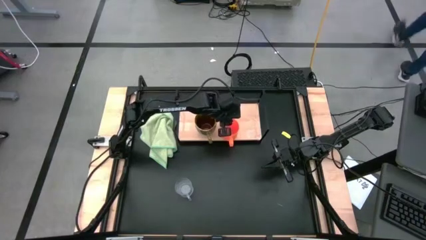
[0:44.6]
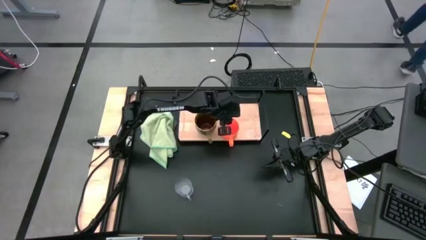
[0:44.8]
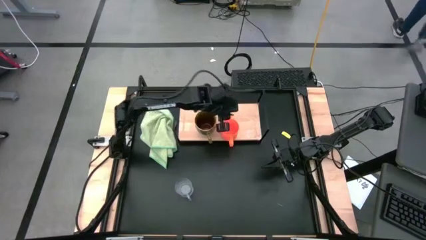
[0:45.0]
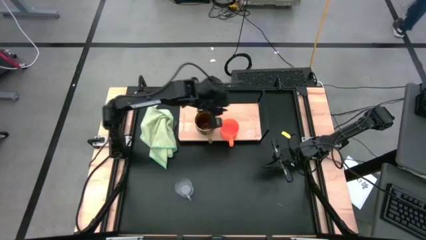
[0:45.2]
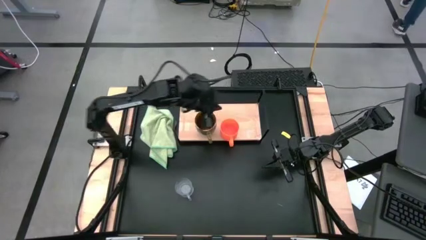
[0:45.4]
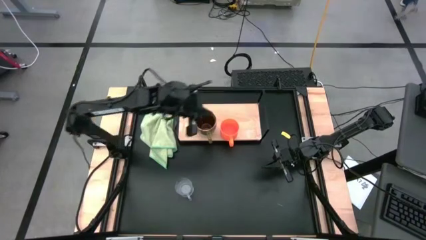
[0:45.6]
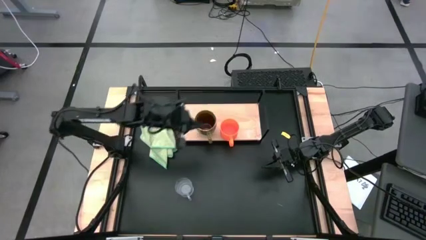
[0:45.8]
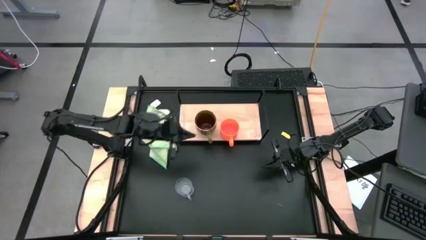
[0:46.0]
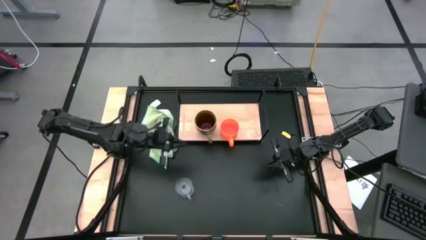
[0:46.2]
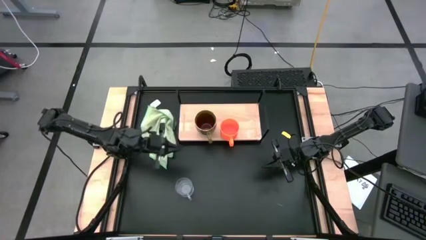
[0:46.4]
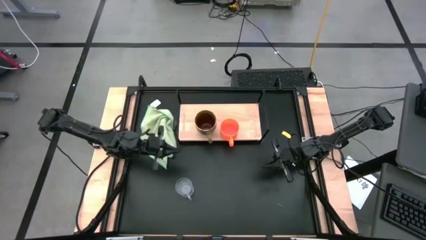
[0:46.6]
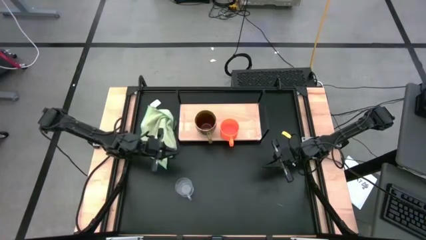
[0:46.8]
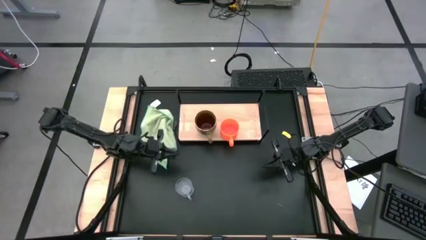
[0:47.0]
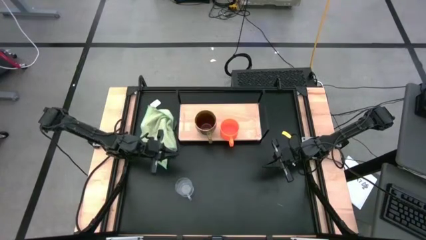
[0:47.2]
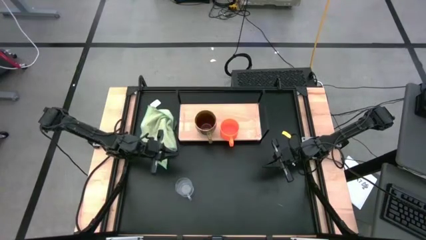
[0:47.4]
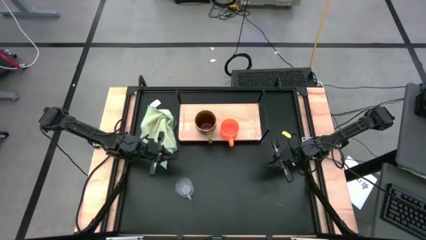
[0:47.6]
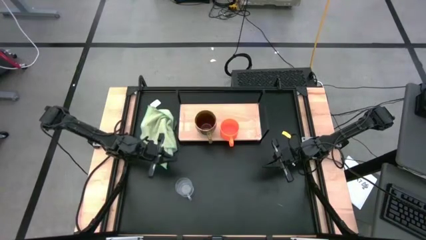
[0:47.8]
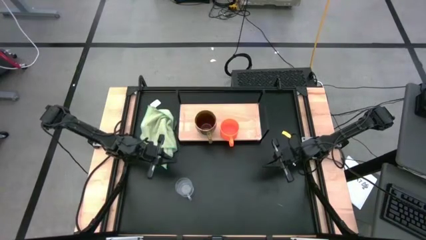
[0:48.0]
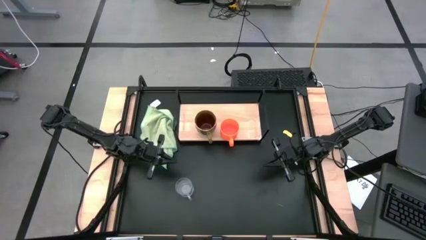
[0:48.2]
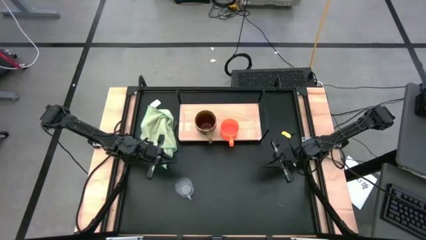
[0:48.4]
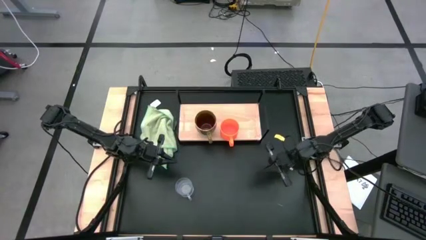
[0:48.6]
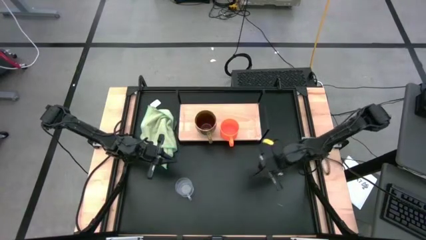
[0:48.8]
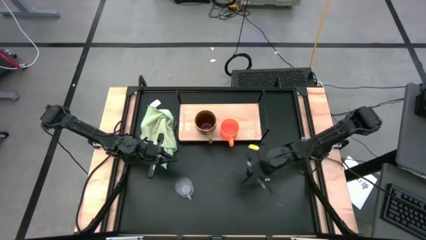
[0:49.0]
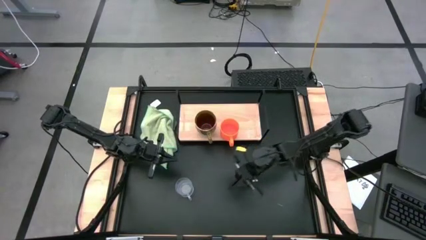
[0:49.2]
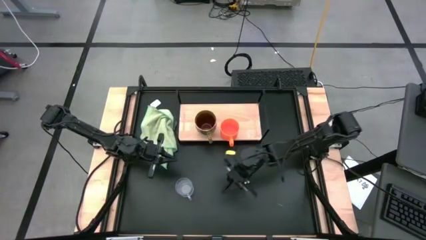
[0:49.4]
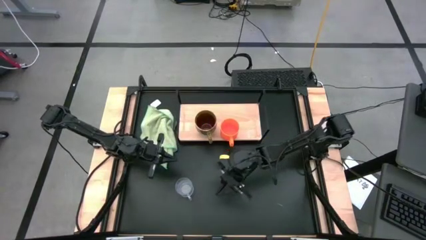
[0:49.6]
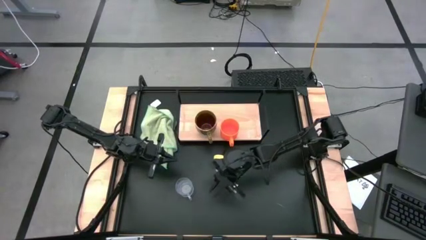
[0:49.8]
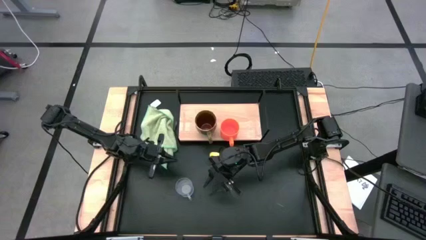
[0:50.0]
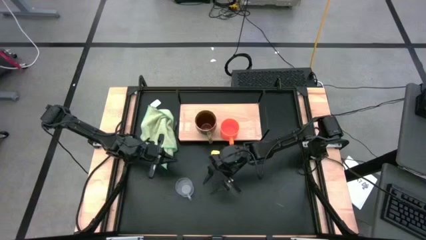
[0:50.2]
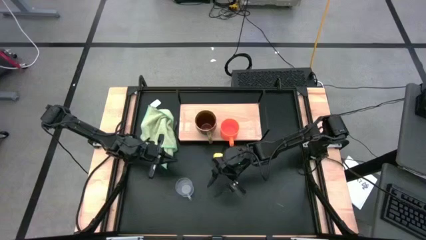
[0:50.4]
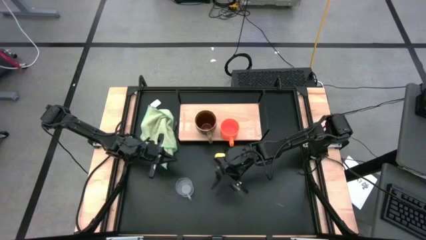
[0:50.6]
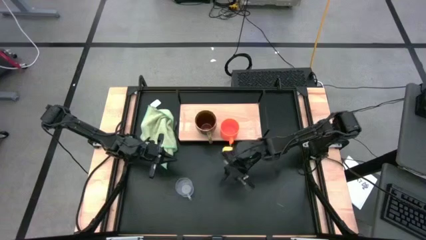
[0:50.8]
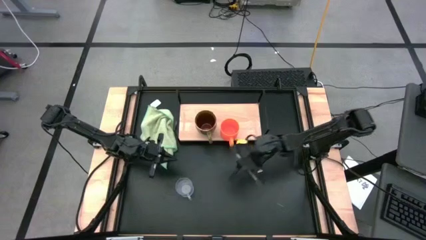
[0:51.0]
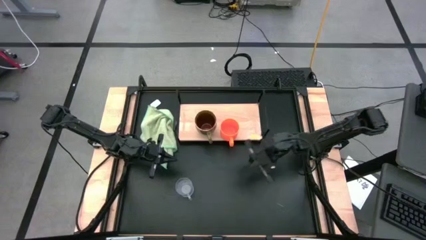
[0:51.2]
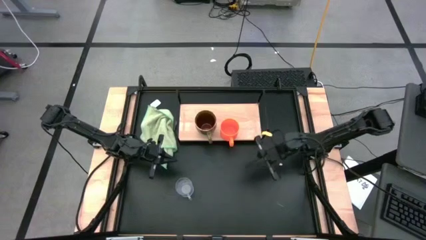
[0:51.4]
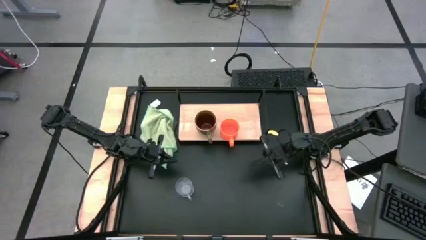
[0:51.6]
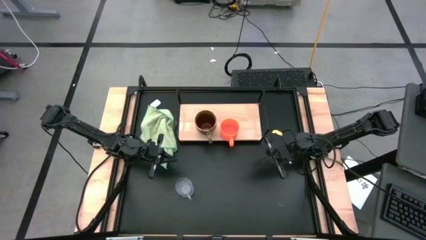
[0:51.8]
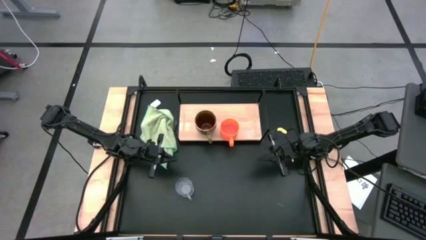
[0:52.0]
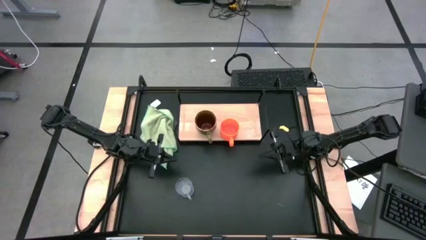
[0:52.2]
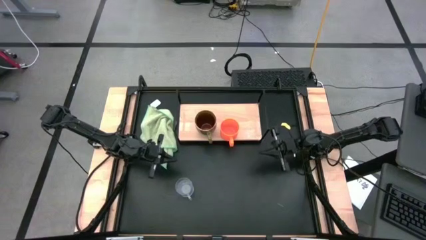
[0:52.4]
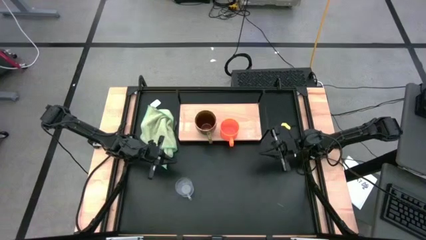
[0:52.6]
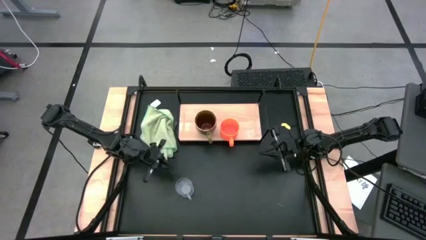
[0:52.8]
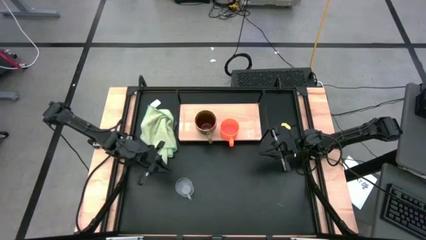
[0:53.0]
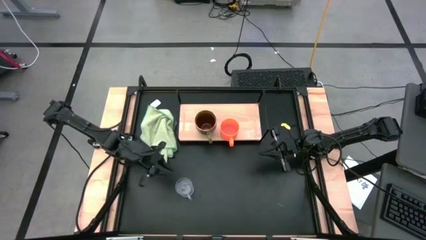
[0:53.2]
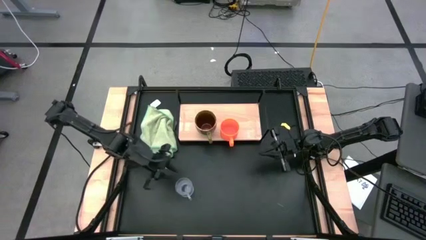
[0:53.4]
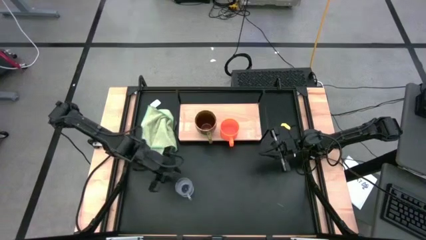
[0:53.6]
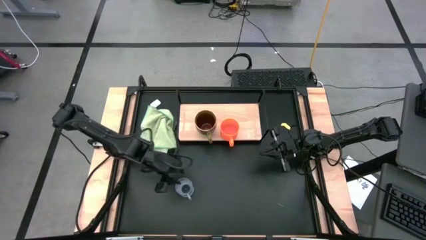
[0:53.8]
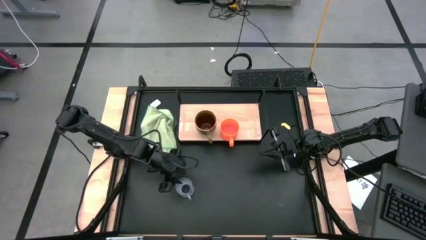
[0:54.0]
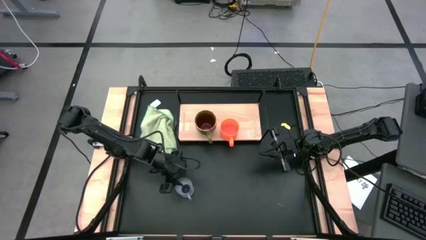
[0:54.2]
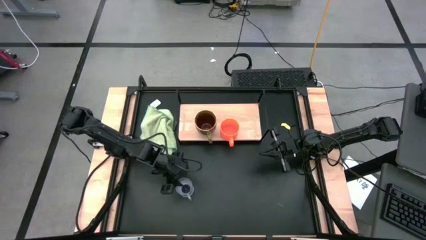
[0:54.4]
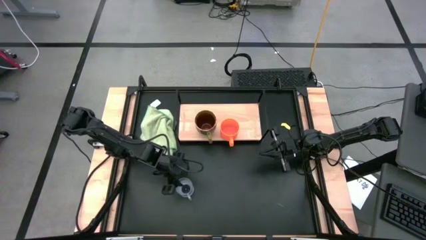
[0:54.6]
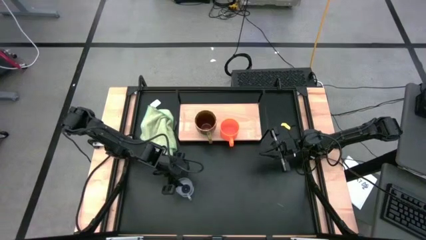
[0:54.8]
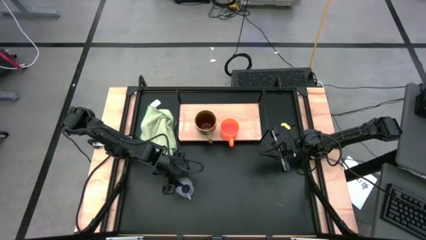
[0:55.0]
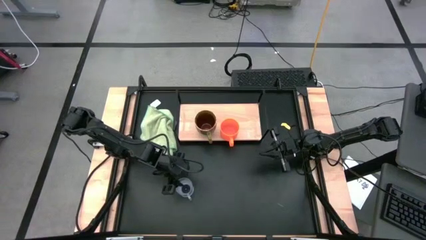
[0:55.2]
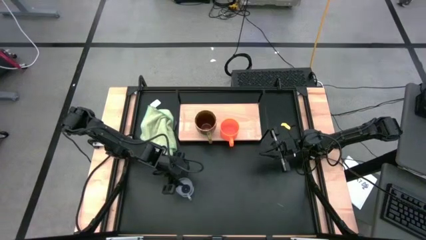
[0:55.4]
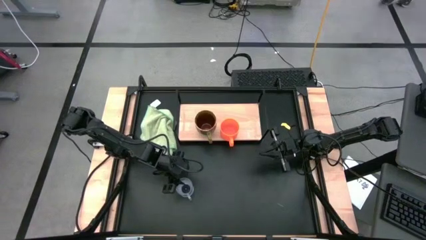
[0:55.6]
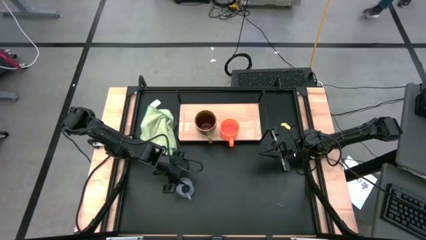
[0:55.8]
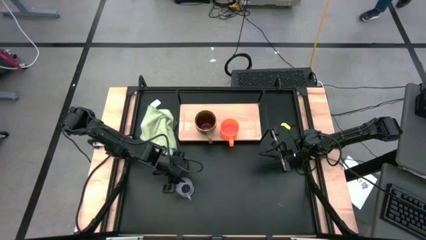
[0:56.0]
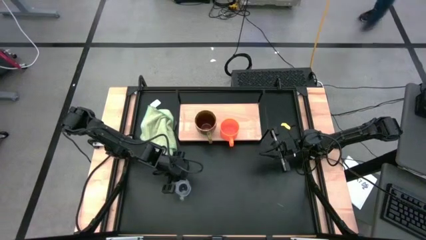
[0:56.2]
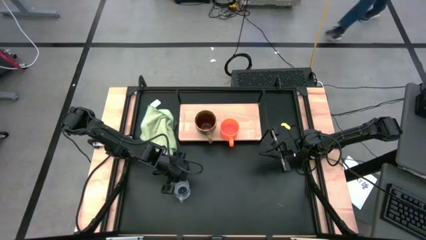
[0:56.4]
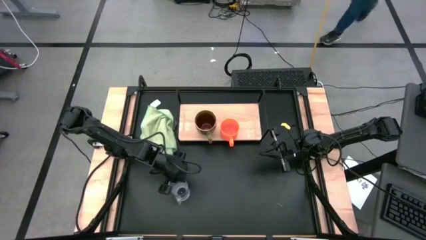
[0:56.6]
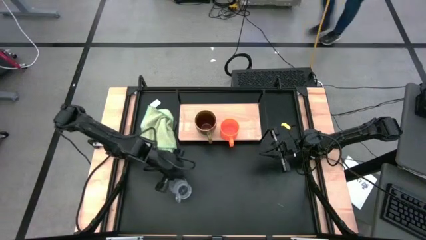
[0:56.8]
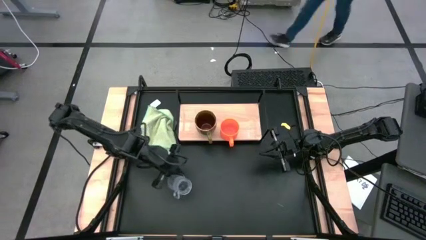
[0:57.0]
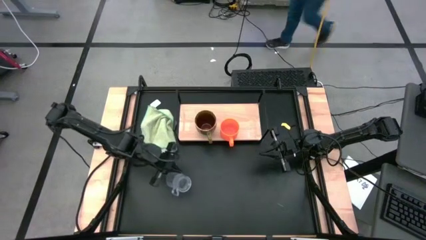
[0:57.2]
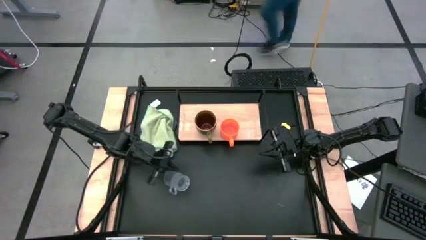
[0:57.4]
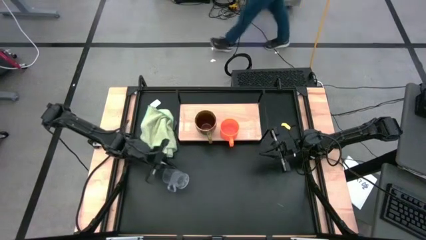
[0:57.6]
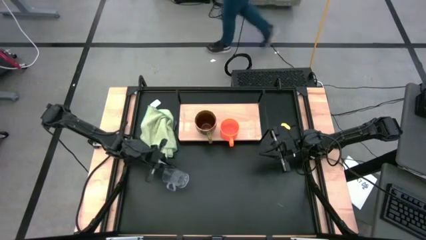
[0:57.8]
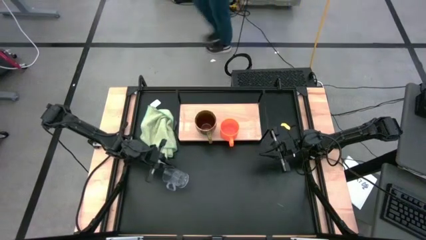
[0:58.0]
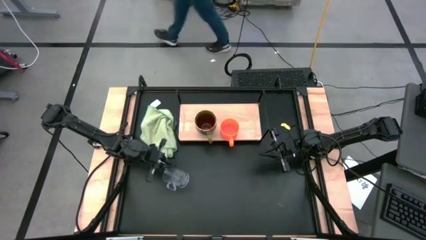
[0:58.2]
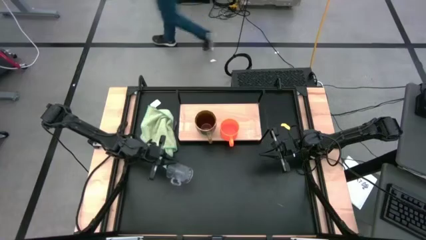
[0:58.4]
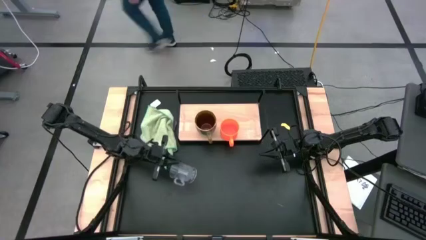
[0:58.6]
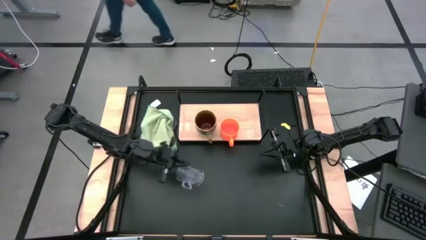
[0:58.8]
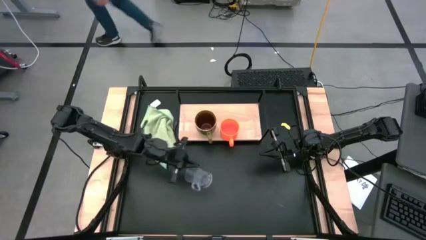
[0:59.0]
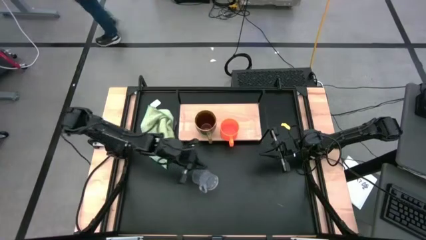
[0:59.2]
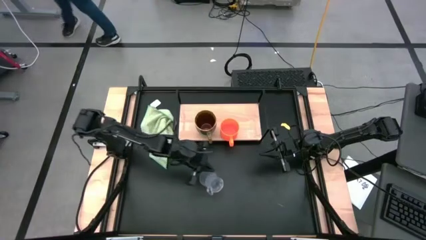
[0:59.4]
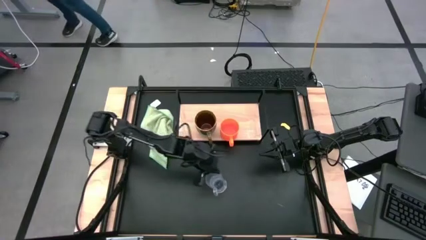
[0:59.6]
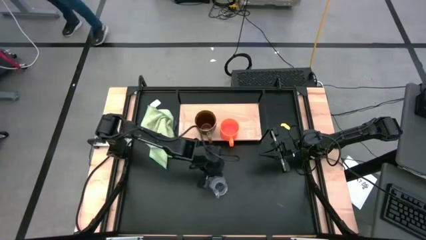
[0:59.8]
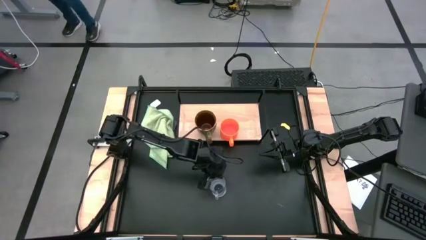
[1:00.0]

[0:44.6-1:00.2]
Task: Stack small to large cups/mugs on shelf
Put the transparent mug to the right of the orange mug on the shelf
